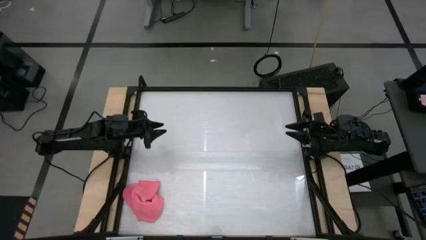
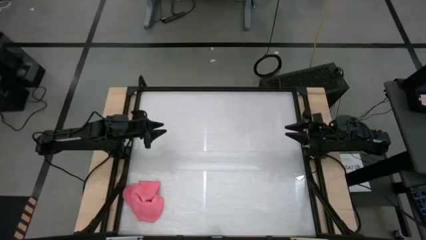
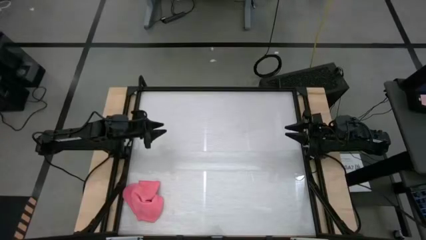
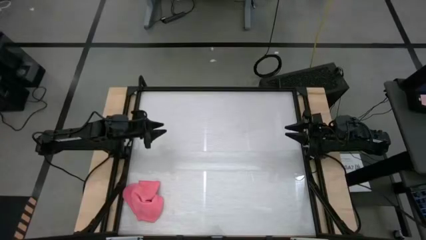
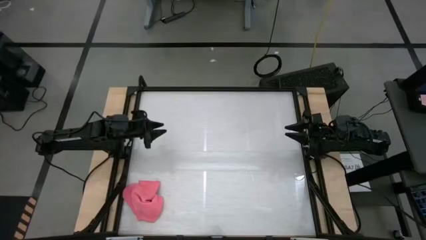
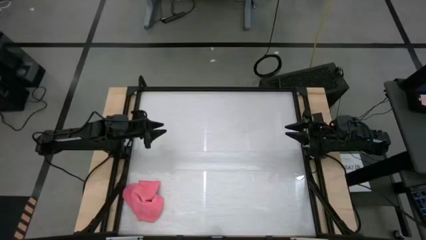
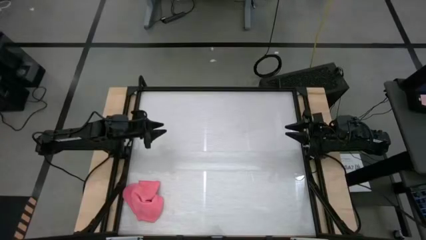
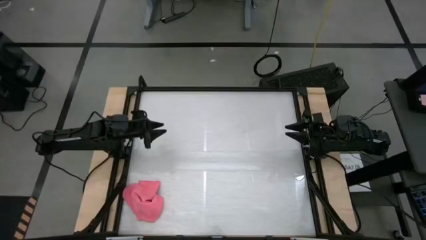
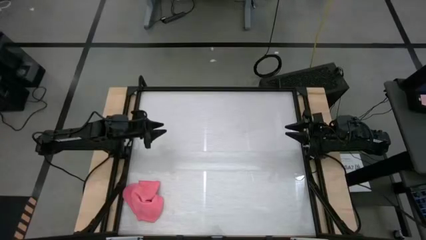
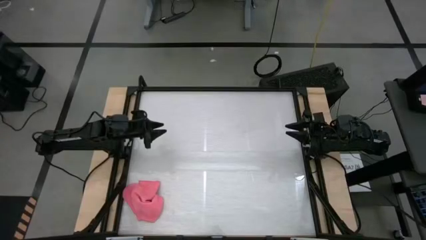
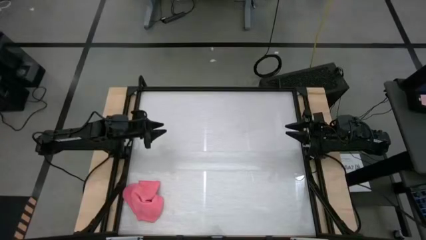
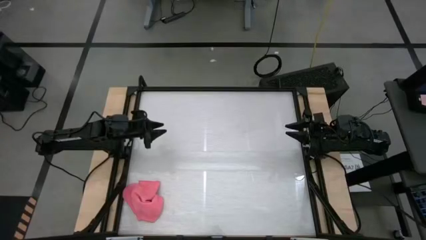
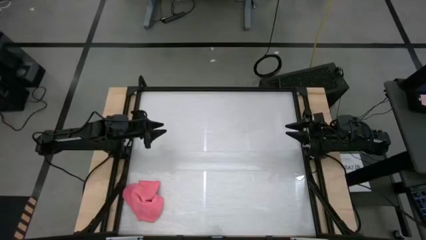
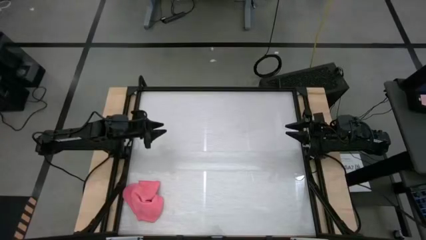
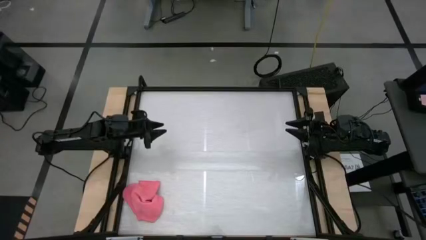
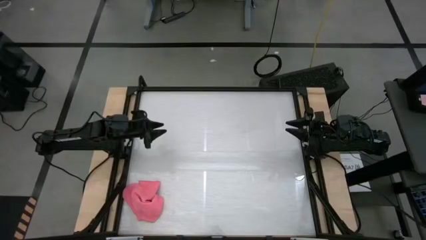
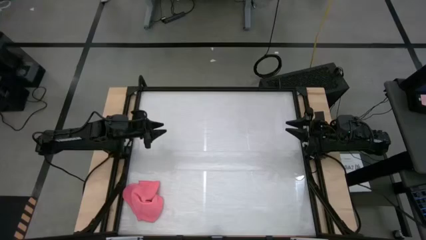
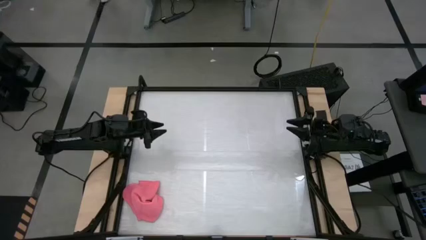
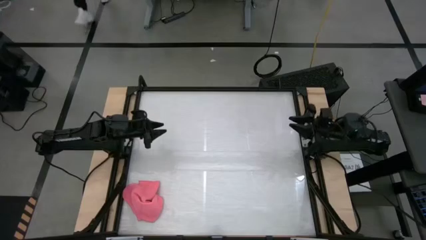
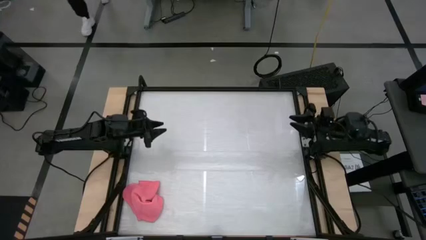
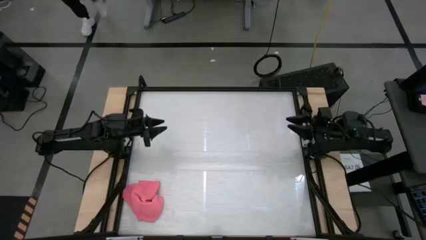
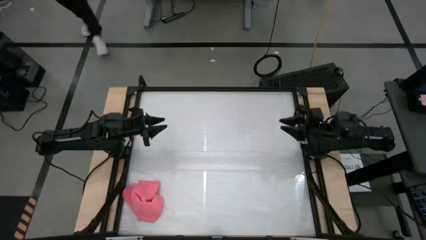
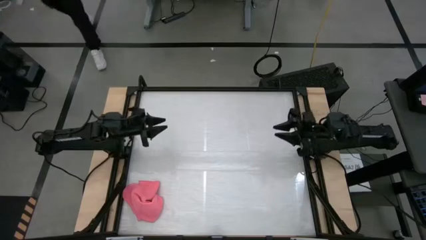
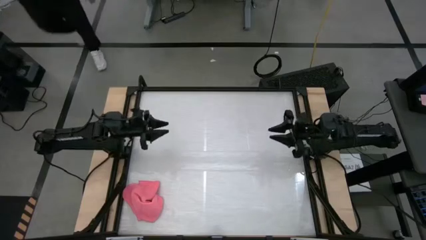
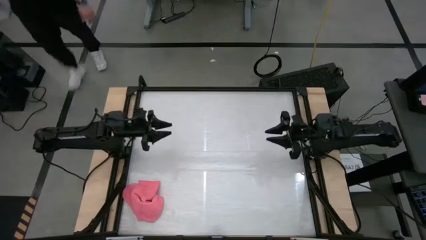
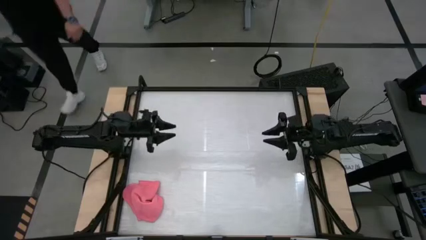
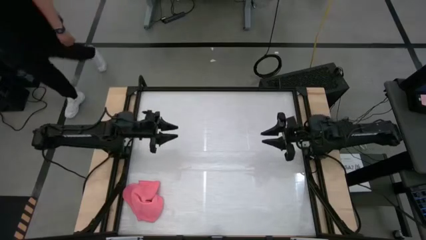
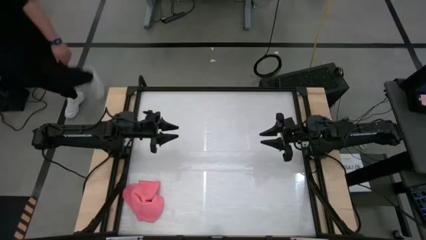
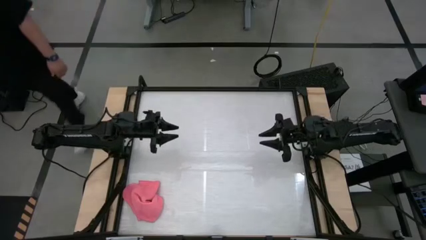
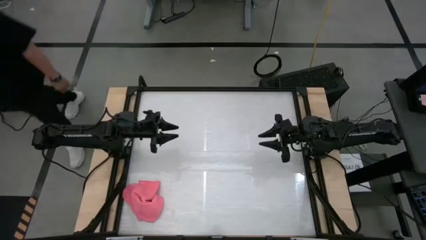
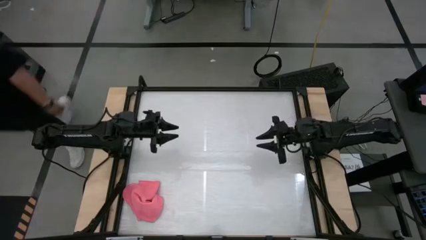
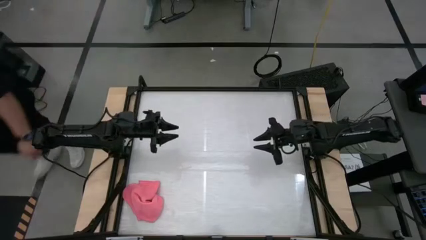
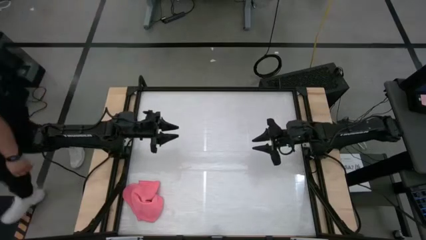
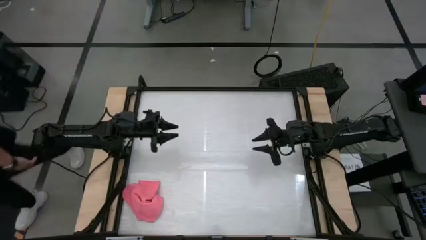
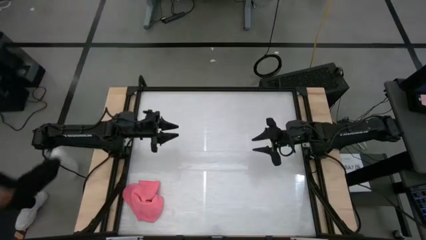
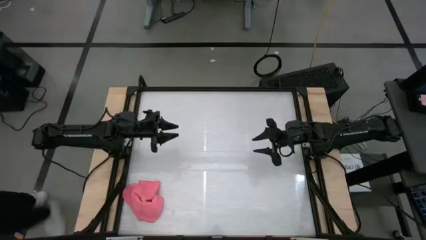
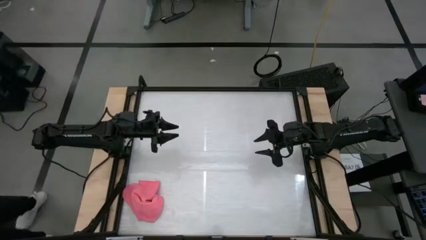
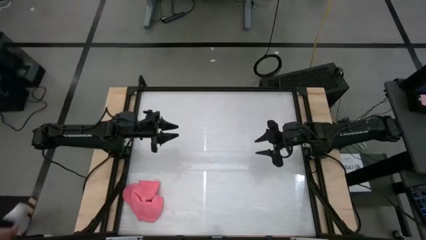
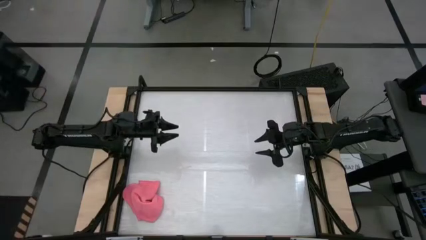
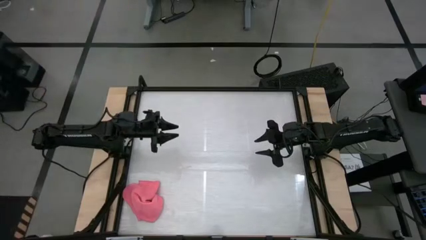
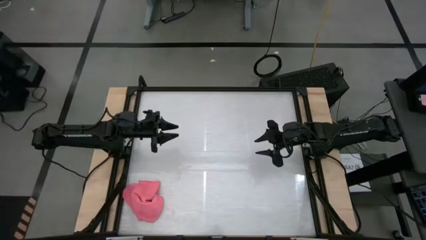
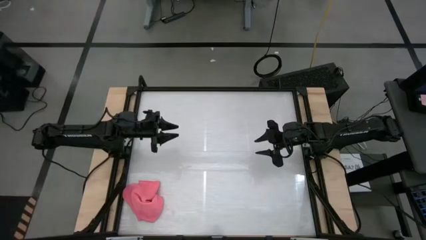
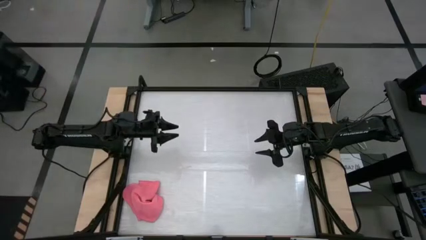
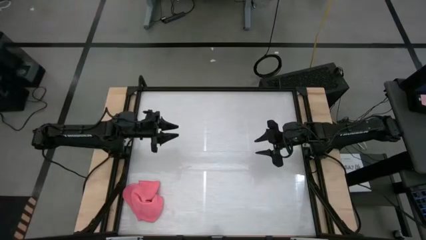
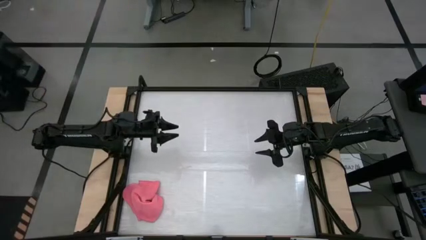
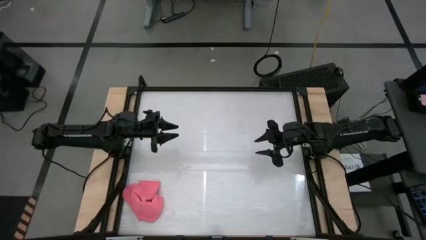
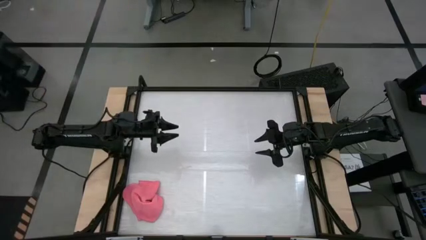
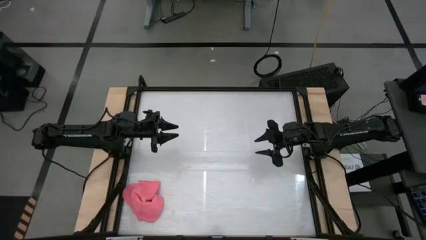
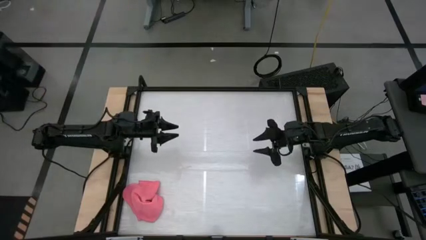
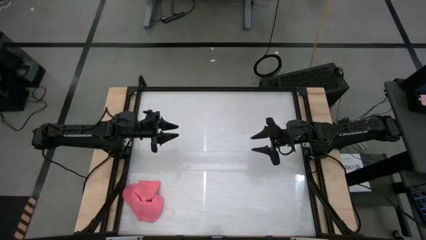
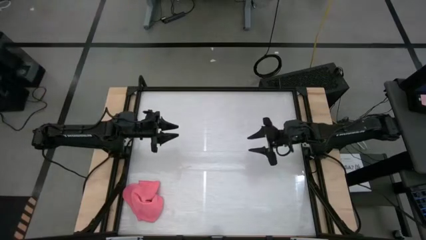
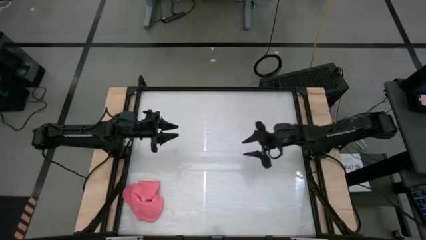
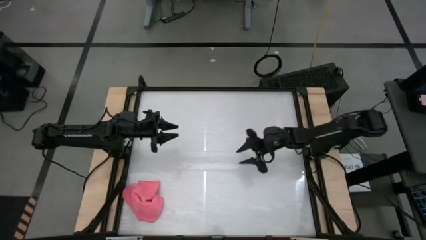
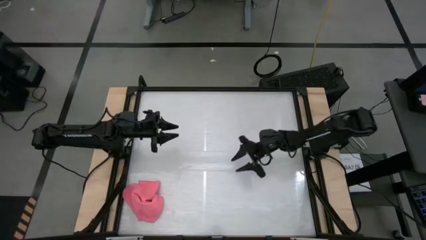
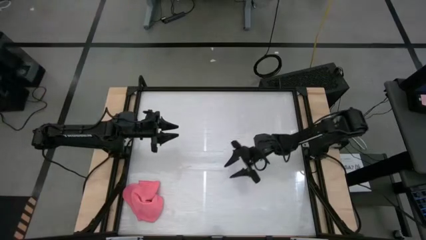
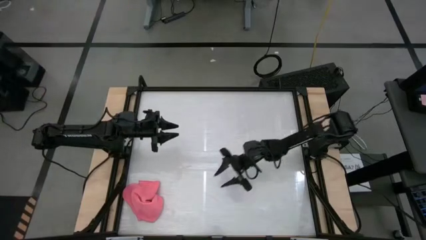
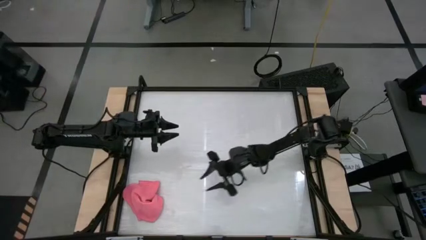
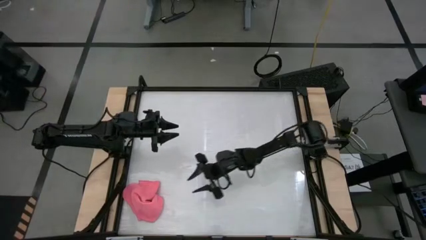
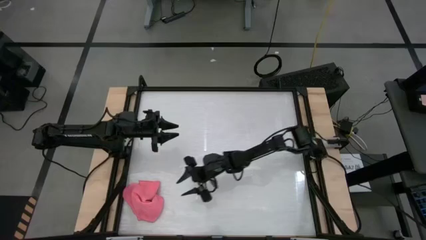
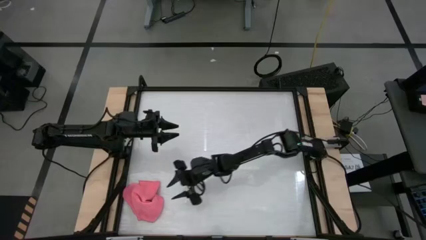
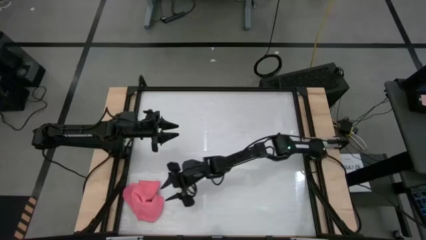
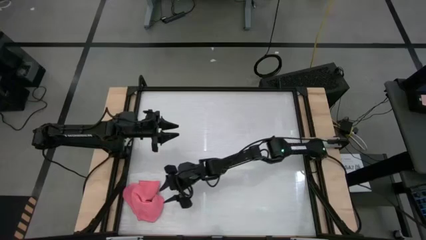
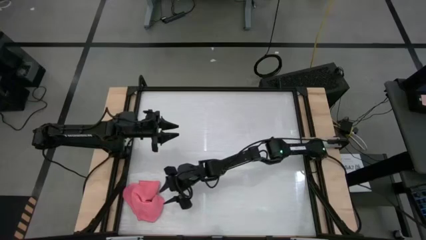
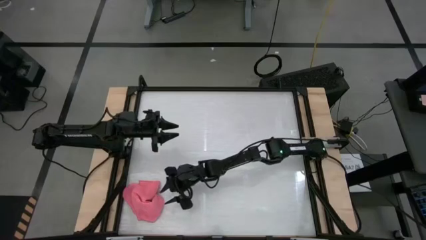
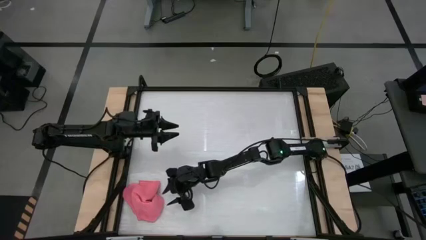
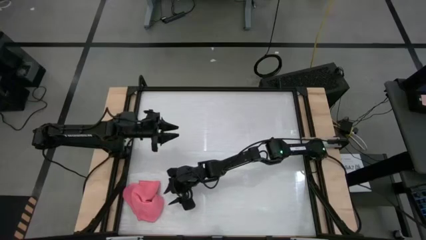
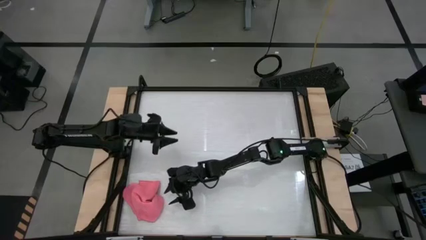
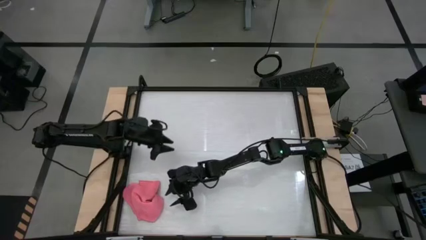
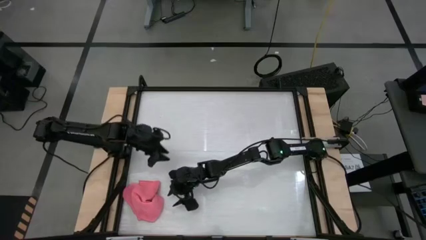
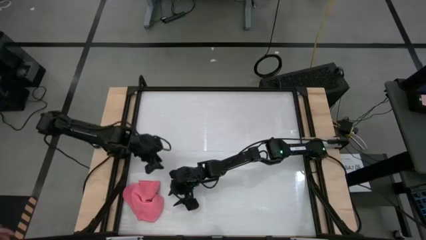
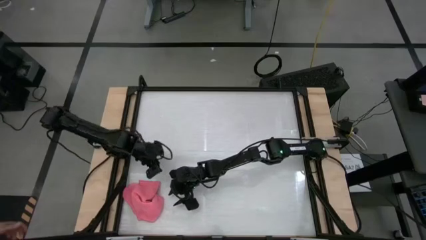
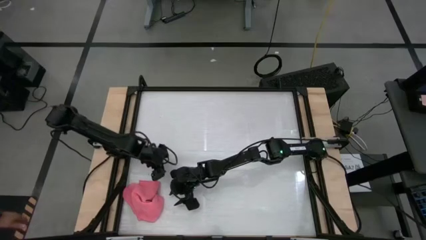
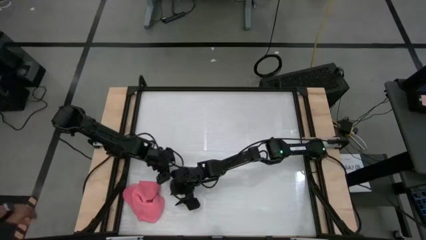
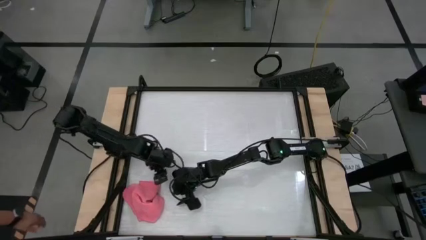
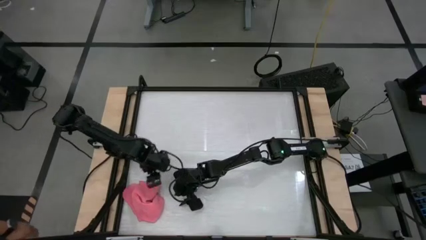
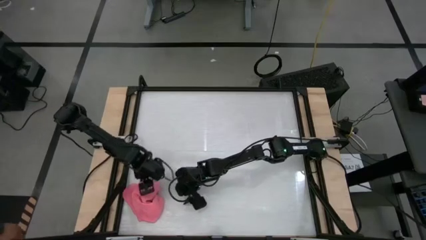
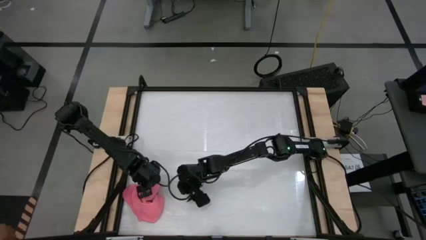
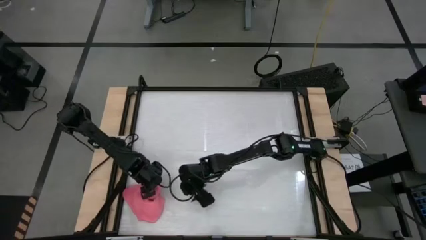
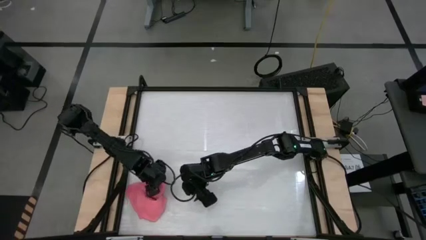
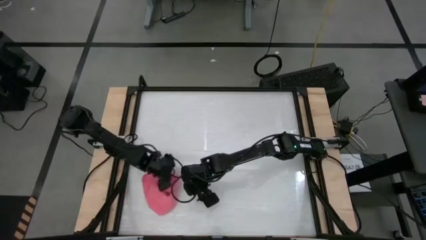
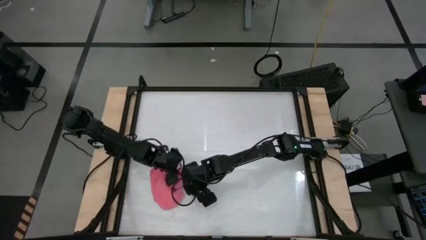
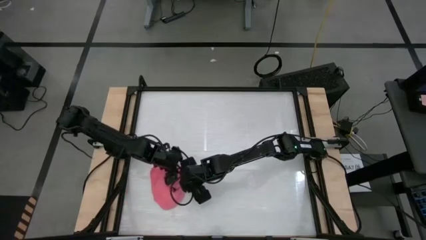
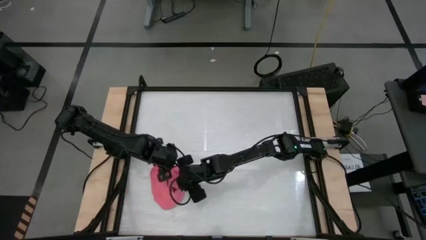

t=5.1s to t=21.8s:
Task: Roll towel
Fold the pink towel
